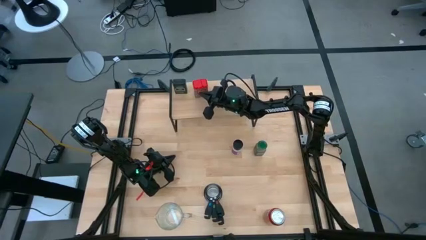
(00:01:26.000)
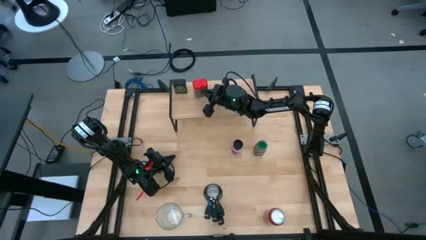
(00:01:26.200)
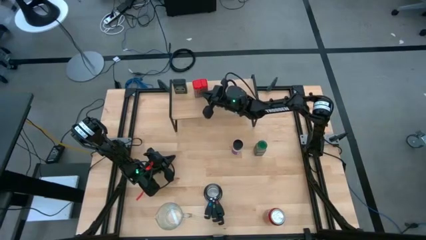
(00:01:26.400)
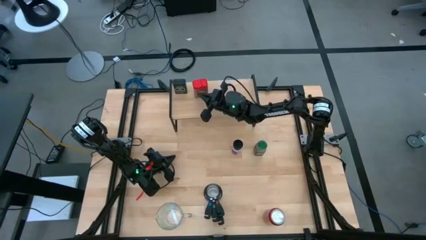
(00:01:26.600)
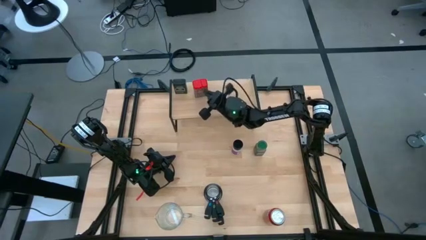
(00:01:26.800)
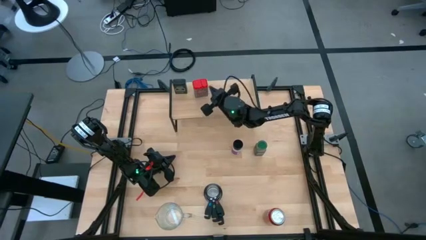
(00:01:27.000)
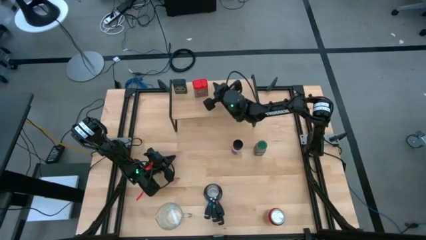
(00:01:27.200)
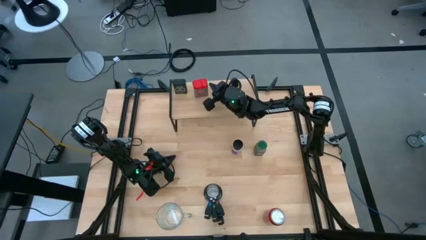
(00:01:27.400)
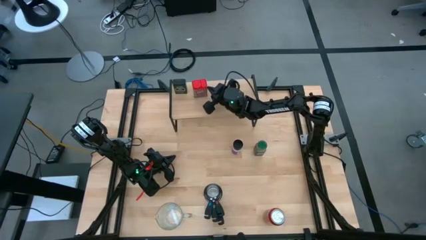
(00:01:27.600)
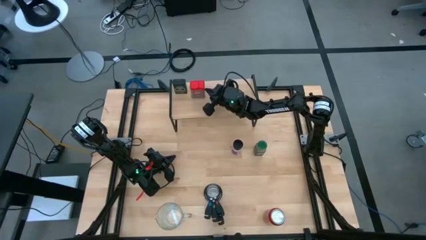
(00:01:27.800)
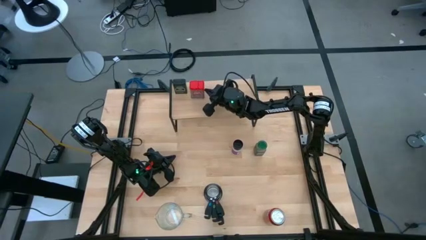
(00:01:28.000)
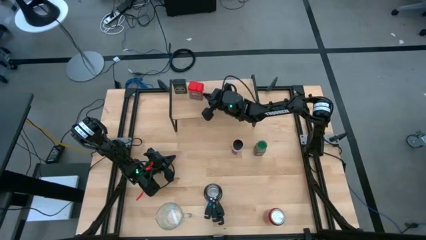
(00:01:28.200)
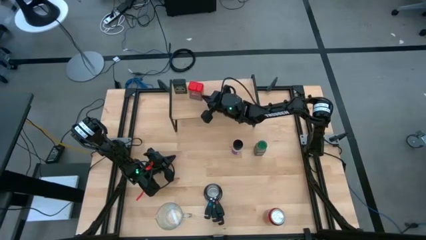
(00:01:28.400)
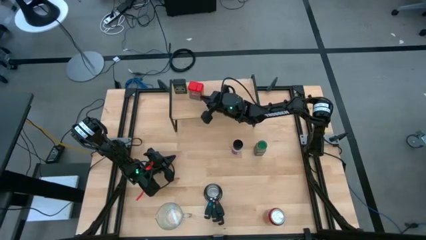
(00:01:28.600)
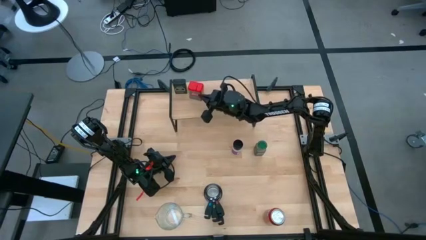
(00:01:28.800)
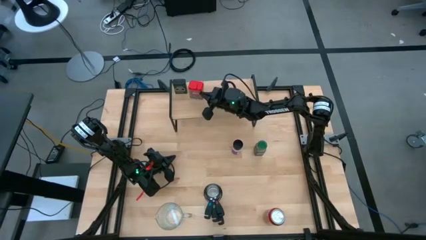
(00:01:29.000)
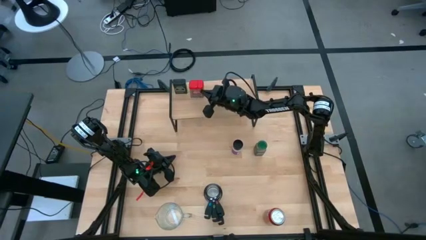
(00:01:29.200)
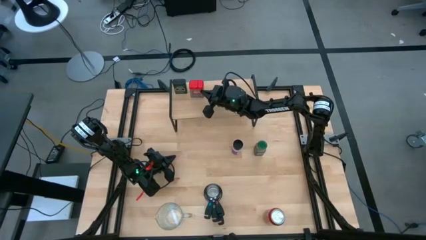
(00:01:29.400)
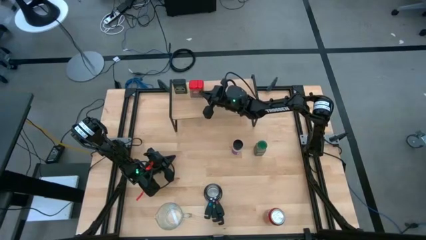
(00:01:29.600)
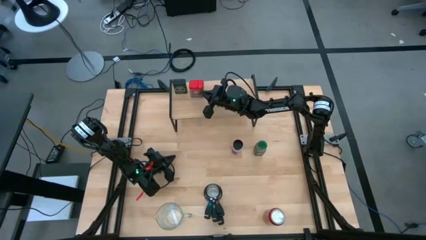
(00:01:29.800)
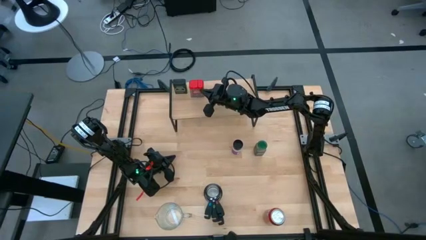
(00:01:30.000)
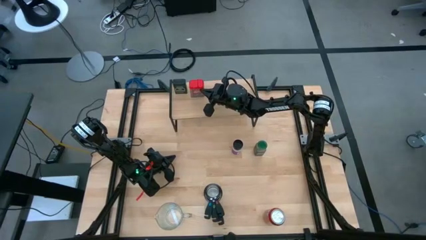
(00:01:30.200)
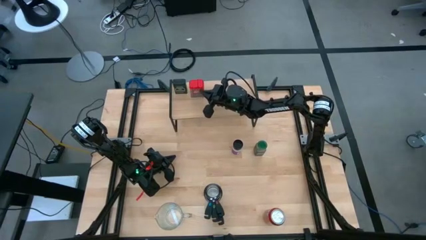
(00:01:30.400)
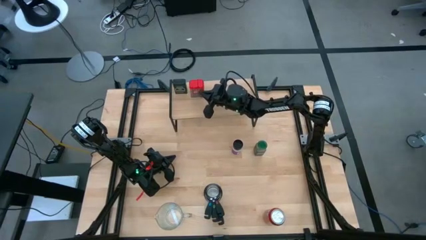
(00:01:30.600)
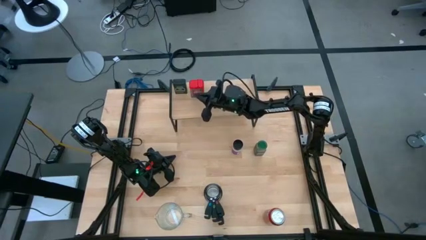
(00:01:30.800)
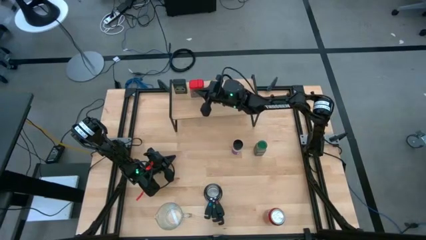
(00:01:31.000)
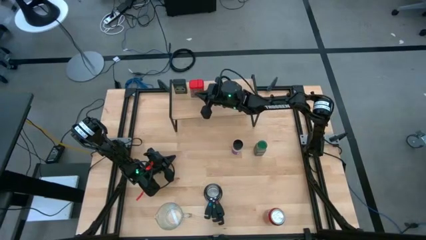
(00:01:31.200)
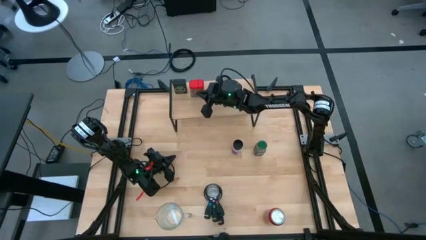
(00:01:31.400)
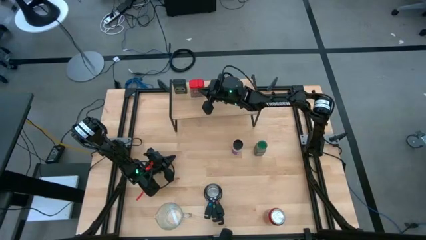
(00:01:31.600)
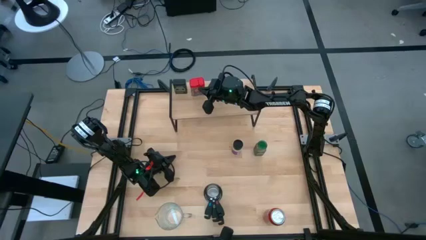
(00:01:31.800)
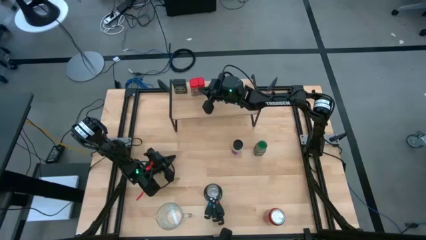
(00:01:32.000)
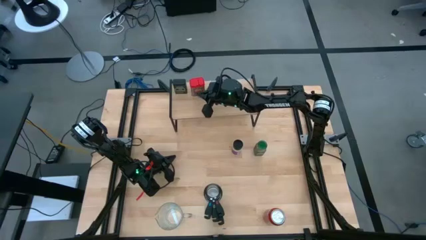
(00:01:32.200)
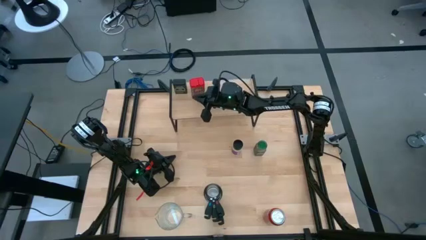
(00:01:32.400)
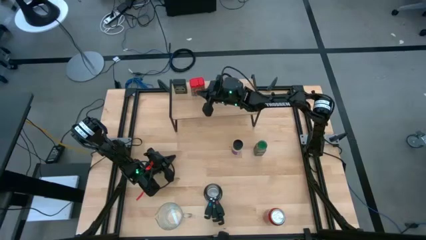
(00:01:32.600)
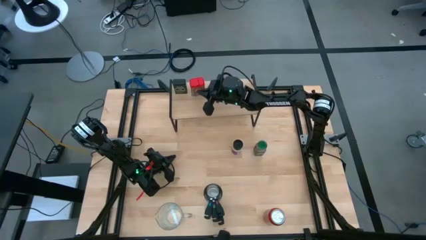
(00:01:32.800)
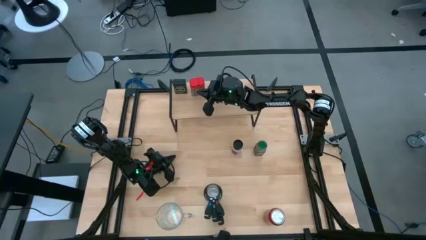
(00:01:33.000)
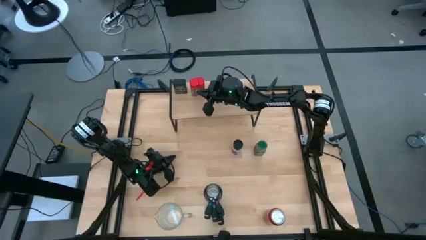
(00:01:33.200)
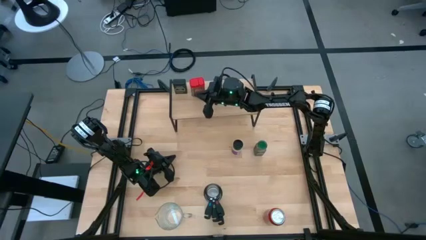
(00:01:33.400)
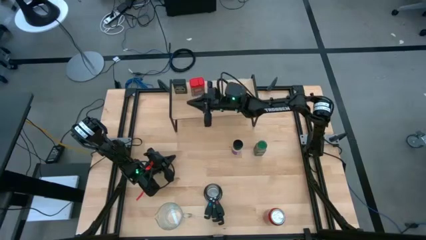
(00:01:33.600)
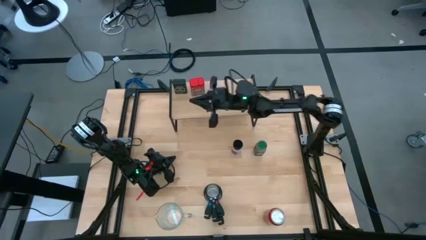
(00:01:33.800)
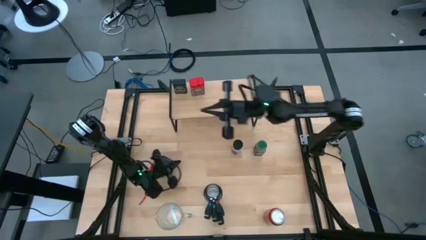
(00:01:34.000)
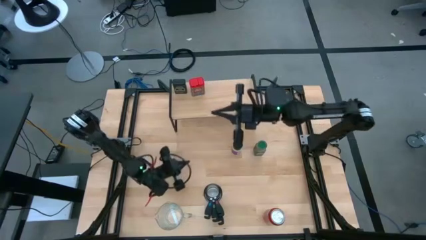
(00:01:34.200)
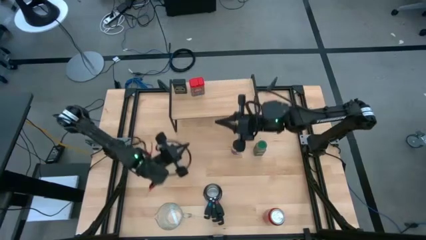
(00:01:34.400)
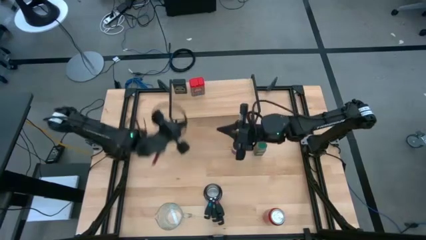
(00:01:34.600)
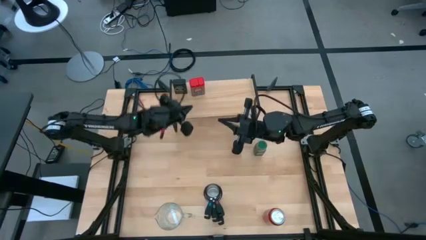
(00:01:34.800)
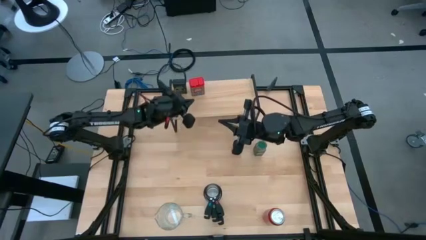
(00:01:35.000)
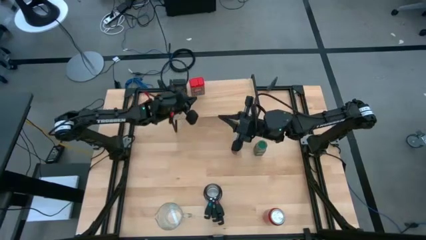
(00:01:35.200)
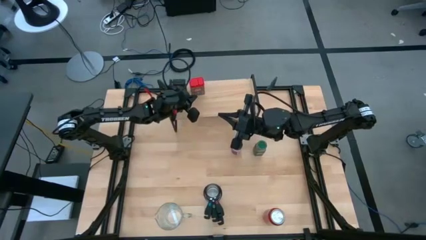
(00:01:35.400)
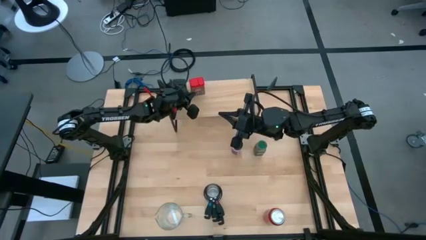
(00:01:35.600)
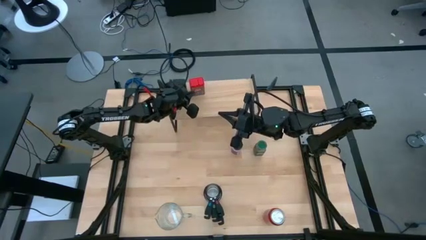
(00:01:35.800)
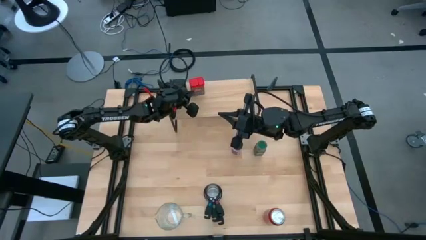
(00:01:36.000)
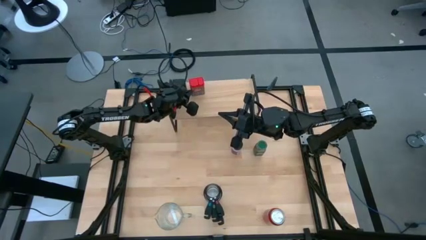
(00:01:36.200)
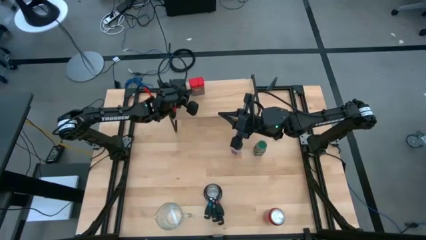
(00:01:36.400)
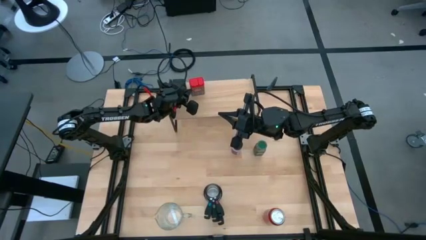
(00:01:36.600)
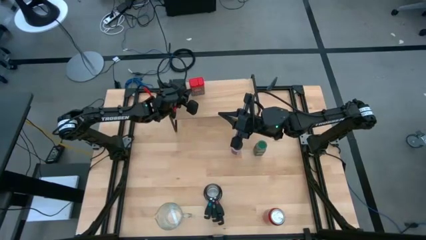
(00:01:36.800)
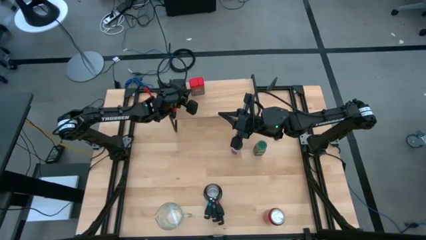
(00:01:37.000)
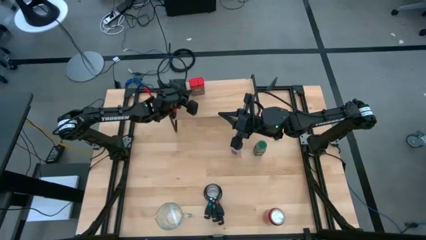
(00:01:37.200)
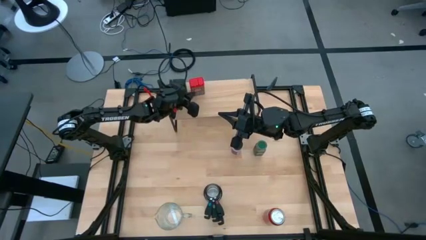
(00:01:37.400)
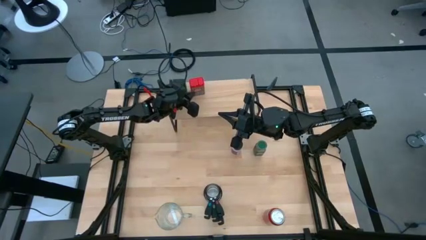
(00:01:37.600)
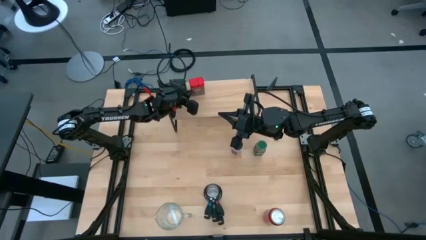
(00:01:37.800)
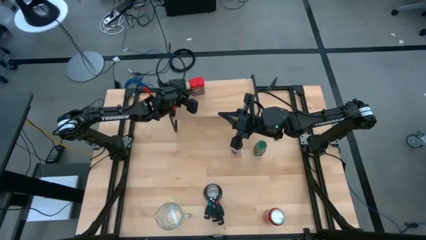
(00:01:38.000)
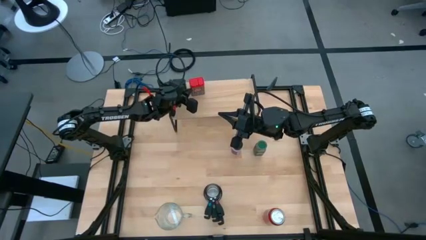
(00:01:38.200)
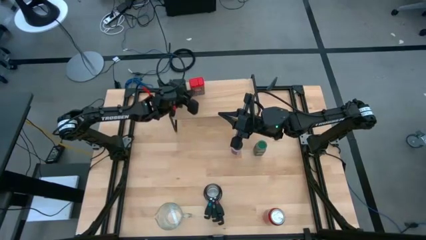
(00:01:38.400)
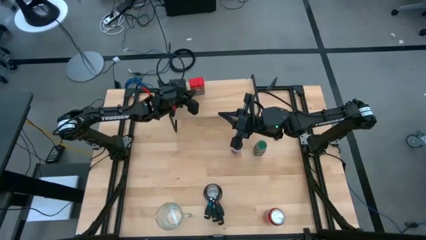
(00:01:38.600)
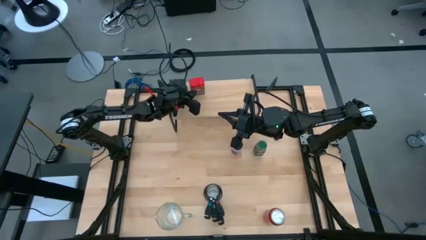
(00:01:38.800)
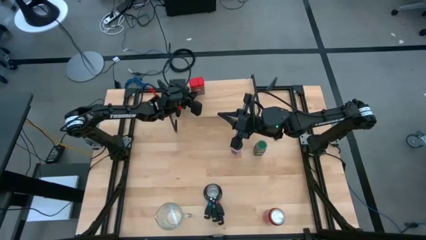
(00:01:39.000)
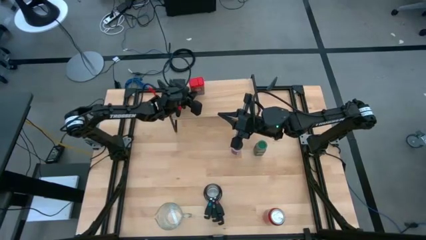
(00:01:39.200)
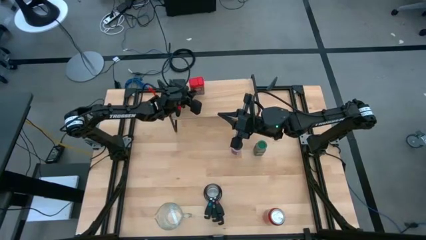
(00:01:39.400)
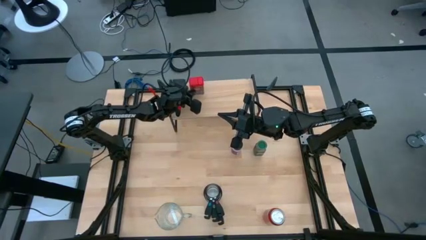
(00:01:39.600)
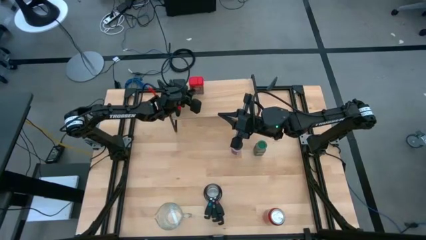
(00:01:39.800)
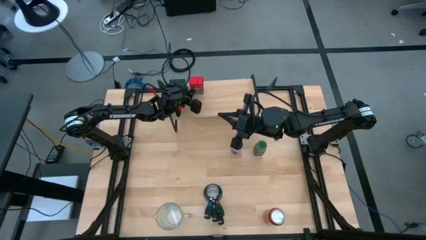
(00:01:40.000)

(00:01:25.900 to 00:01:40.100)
Task: Shelf spices
Put the red seasoning can on the shelf

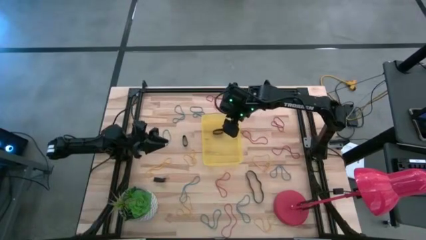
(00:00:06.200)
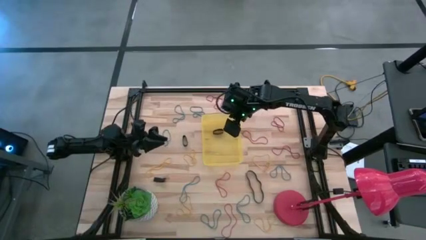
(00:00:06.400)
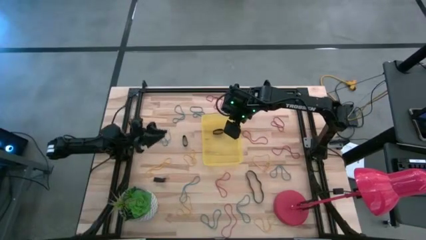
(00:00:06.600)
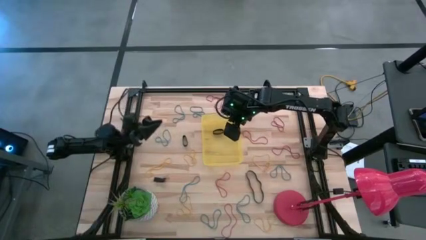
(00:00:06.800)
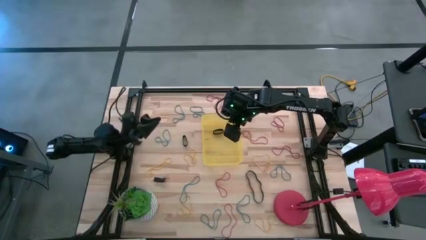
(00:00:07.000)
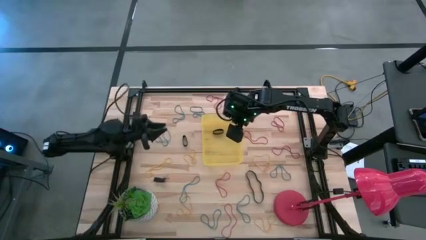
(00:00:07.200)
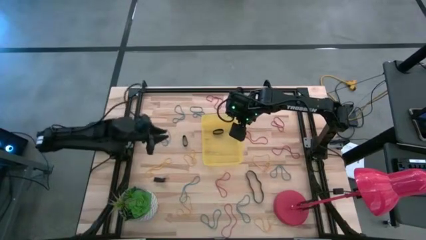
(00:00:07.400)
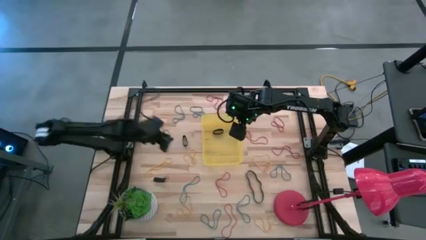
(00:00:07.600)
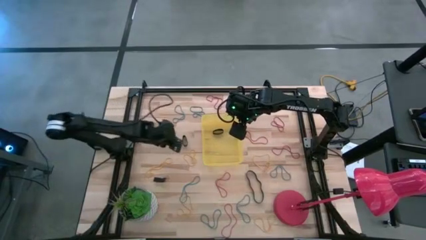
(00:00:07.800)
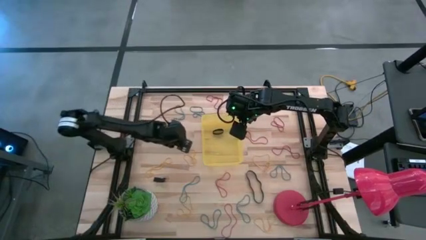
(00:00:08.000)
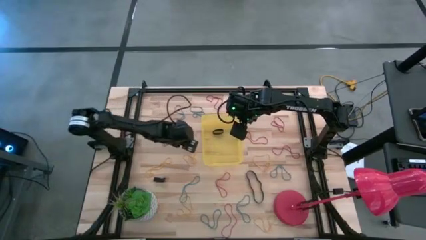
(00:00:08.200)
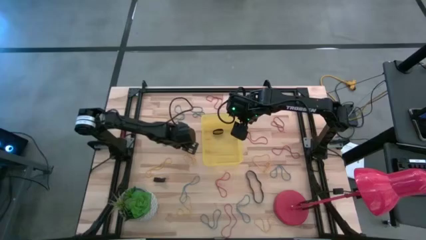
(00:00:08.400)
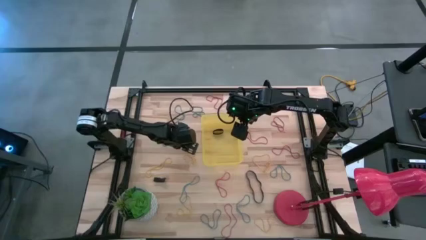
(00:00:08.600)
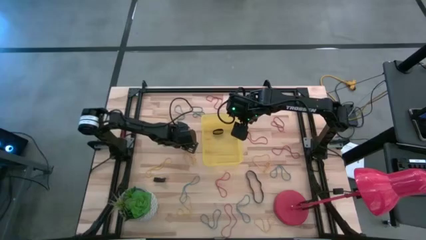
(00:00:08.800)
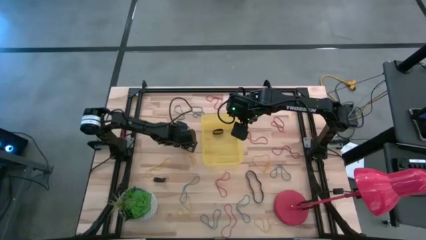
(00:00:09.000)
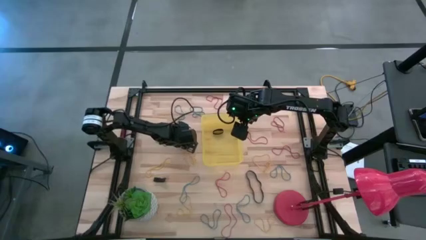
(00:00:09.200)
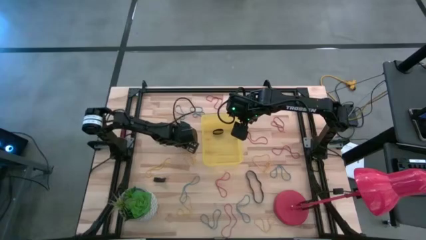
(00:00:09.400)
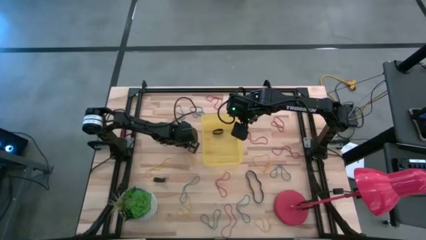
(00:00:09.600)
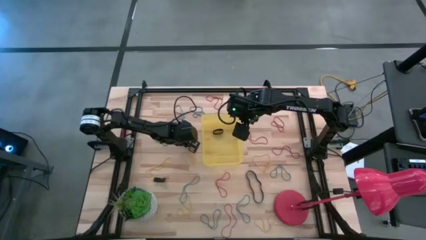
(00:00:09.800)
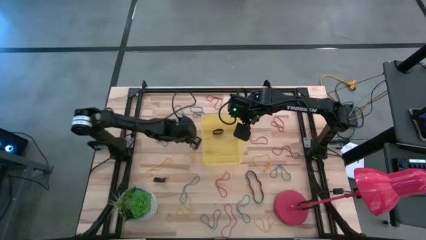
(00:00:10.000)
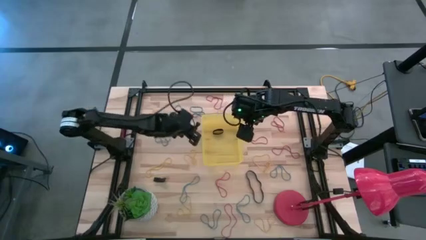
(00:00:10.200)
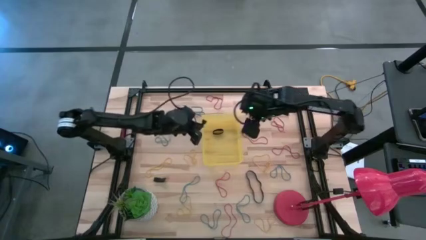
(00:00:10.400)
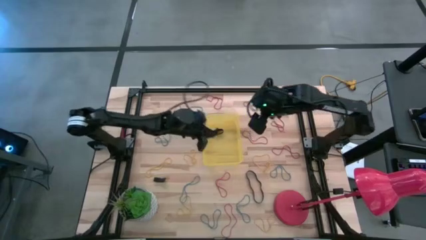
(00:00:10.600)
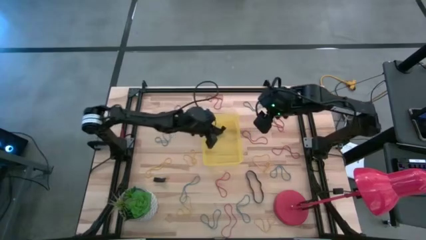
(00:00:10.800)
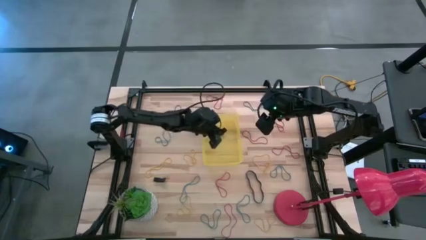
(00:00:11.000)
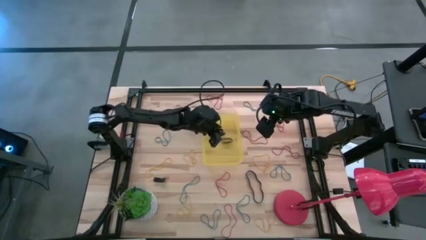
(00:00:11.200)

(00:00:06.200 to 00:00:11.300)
Task: Pick and place rubber bands into bin
Put the top small black rubber band into the yellow bin
